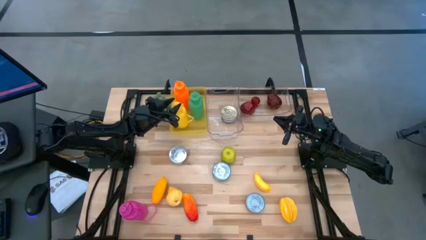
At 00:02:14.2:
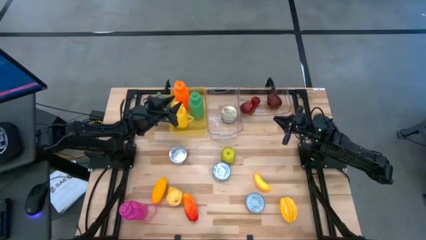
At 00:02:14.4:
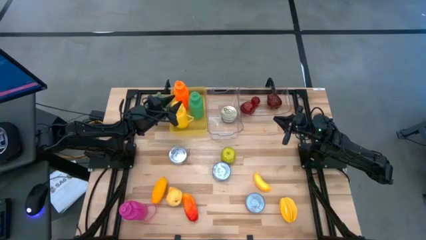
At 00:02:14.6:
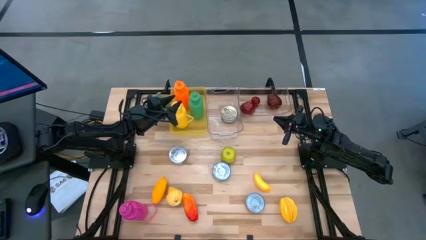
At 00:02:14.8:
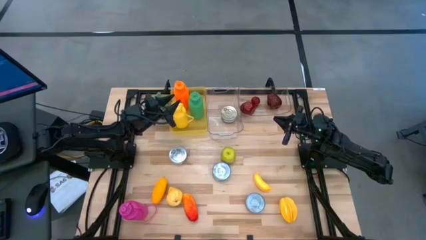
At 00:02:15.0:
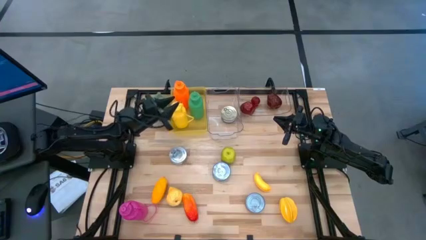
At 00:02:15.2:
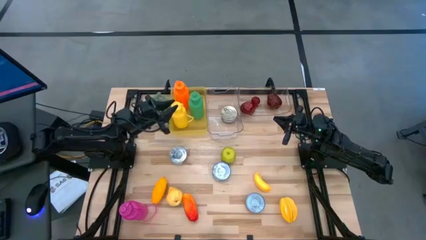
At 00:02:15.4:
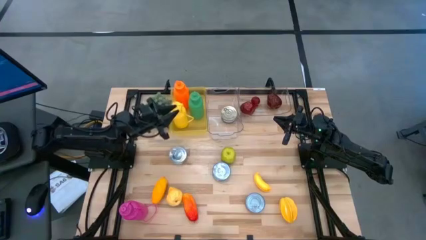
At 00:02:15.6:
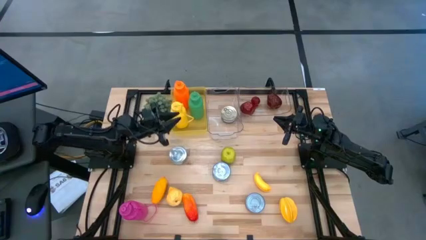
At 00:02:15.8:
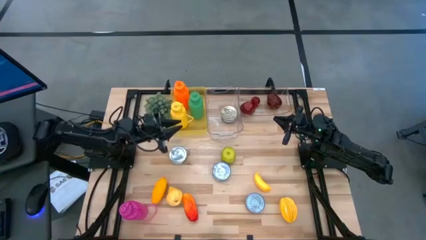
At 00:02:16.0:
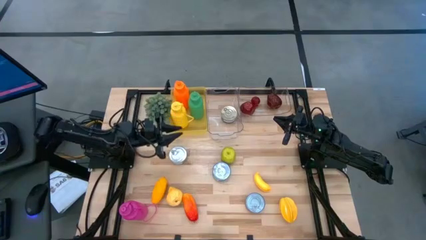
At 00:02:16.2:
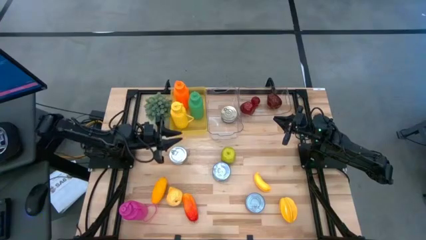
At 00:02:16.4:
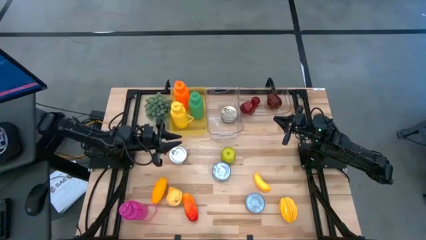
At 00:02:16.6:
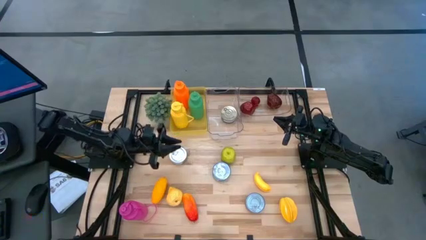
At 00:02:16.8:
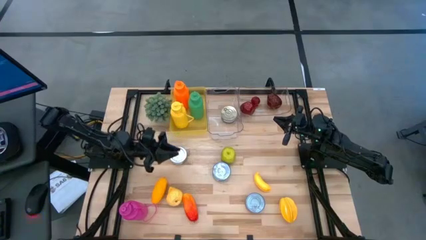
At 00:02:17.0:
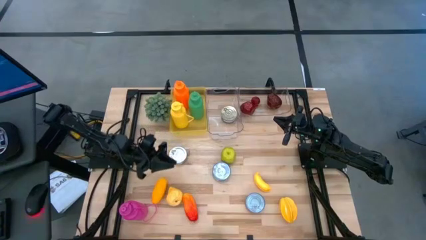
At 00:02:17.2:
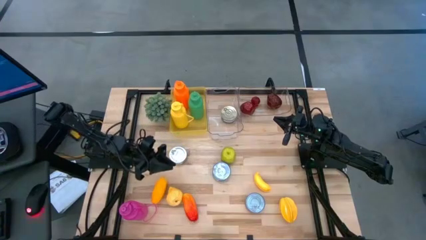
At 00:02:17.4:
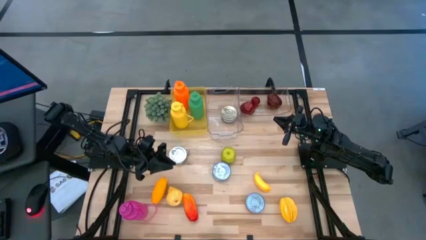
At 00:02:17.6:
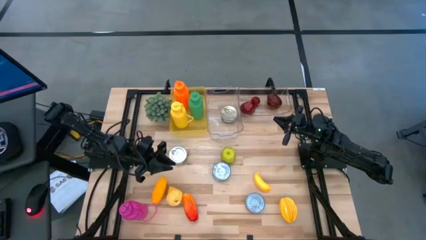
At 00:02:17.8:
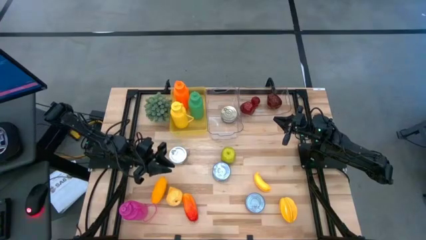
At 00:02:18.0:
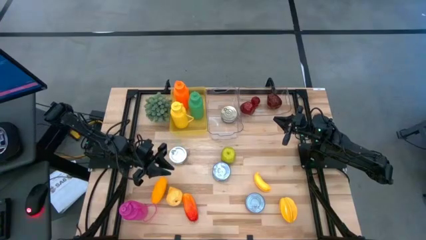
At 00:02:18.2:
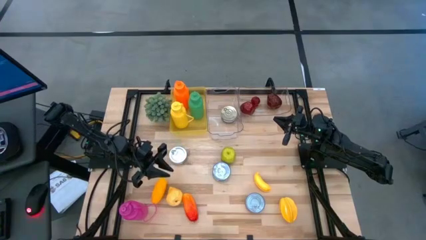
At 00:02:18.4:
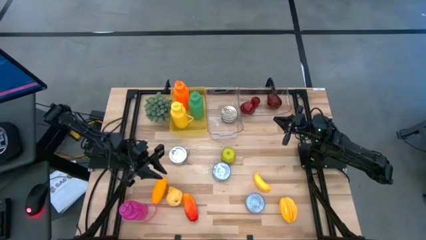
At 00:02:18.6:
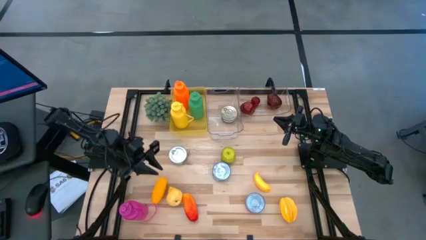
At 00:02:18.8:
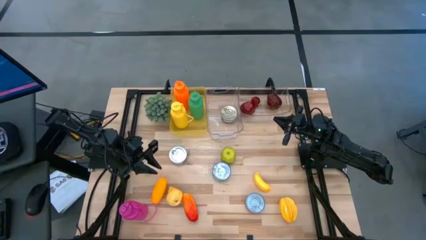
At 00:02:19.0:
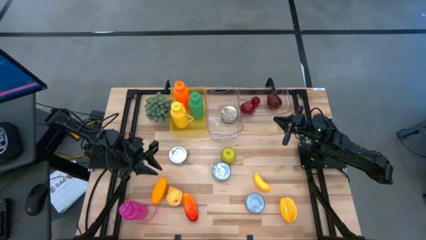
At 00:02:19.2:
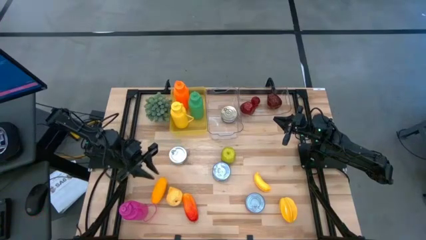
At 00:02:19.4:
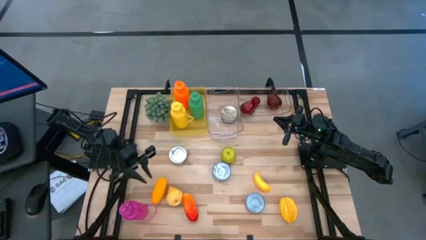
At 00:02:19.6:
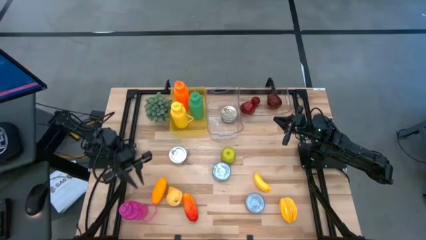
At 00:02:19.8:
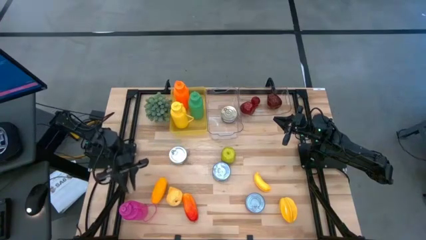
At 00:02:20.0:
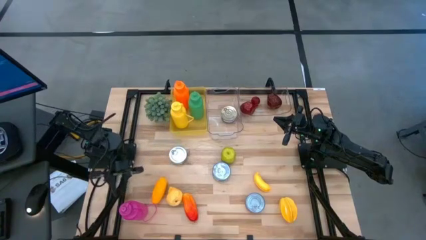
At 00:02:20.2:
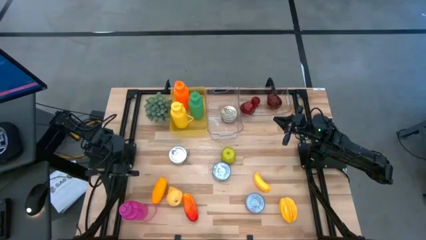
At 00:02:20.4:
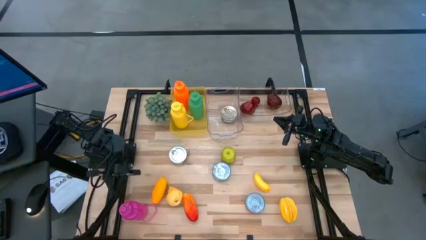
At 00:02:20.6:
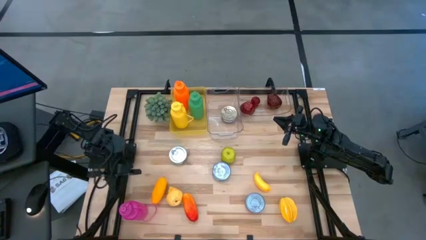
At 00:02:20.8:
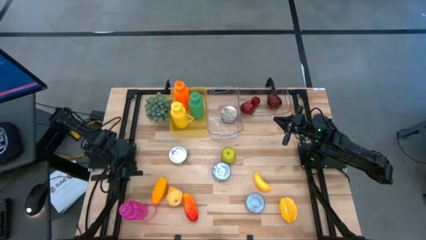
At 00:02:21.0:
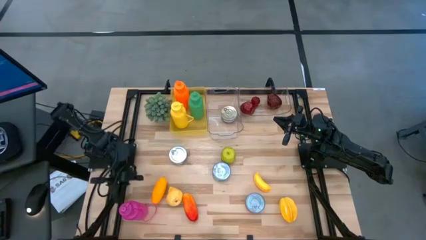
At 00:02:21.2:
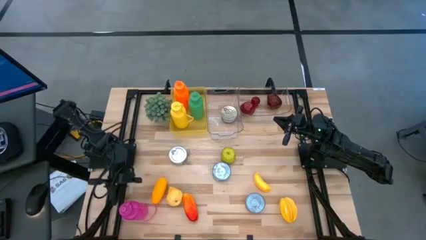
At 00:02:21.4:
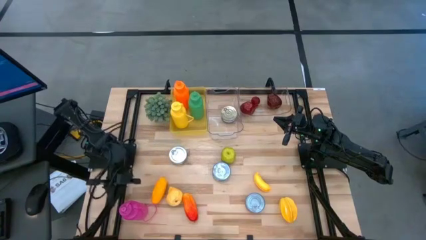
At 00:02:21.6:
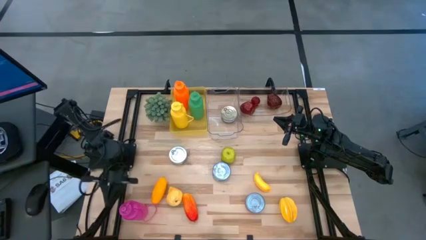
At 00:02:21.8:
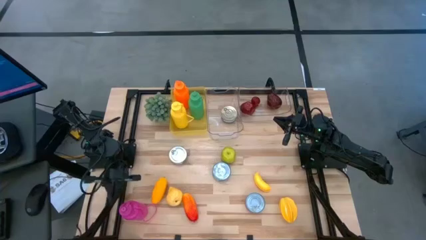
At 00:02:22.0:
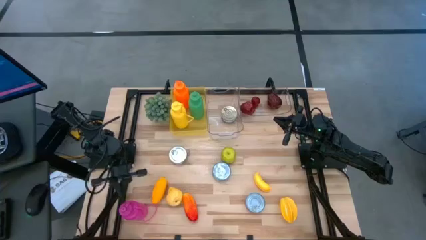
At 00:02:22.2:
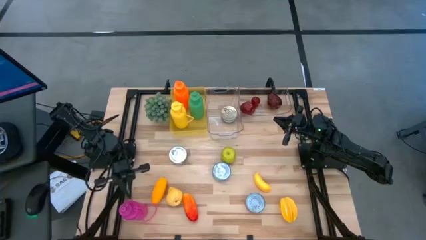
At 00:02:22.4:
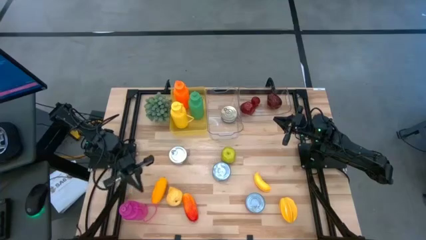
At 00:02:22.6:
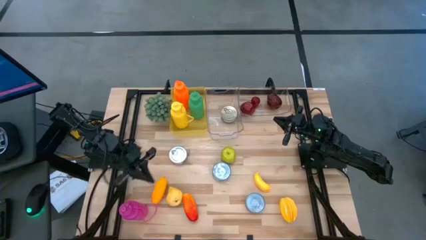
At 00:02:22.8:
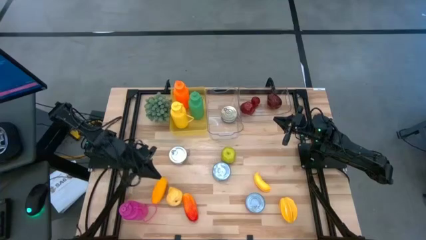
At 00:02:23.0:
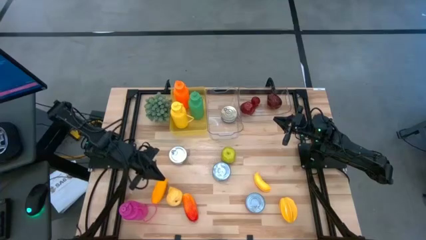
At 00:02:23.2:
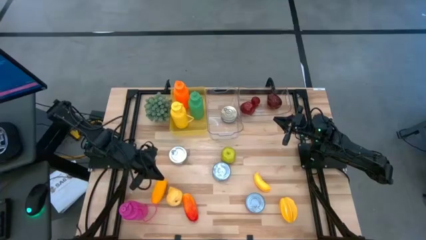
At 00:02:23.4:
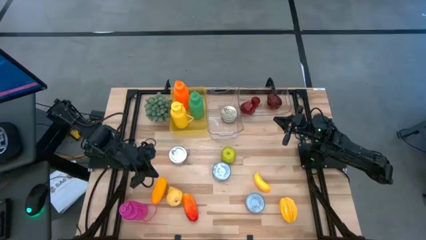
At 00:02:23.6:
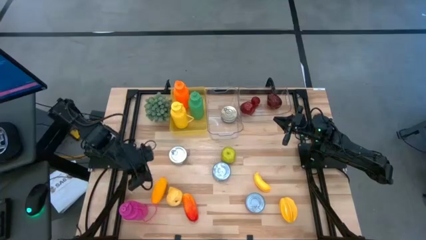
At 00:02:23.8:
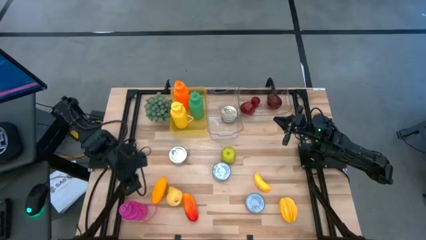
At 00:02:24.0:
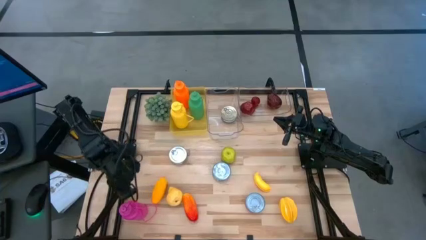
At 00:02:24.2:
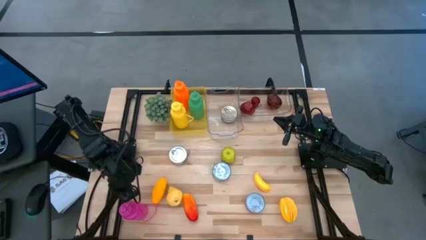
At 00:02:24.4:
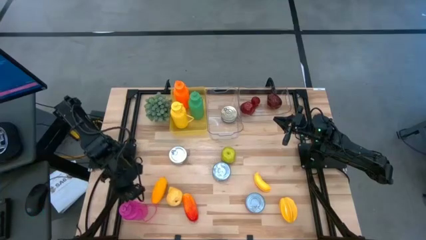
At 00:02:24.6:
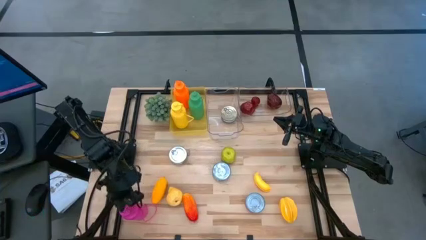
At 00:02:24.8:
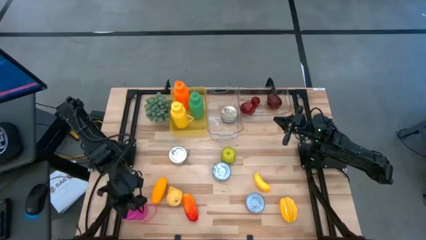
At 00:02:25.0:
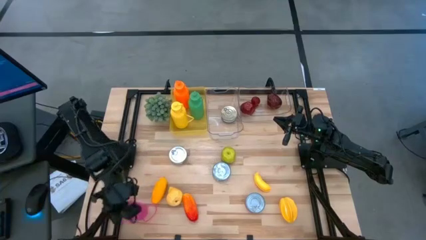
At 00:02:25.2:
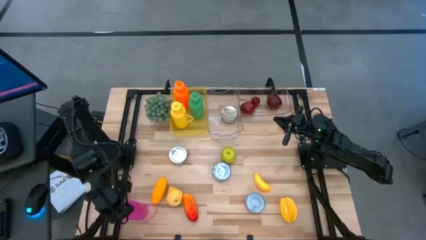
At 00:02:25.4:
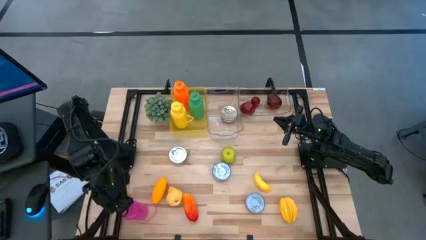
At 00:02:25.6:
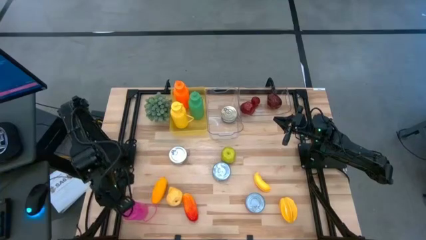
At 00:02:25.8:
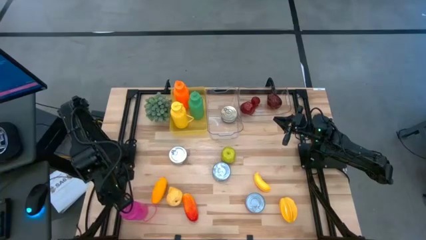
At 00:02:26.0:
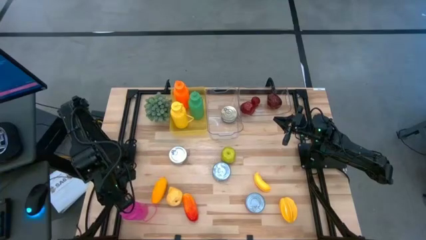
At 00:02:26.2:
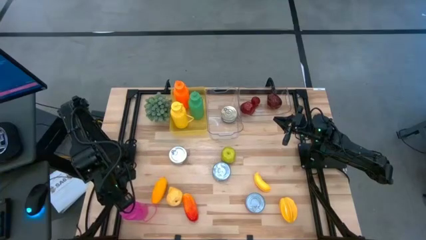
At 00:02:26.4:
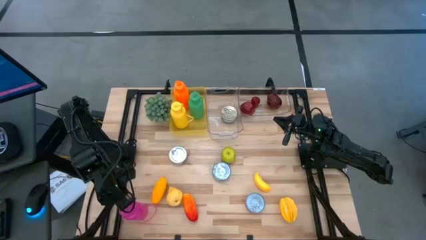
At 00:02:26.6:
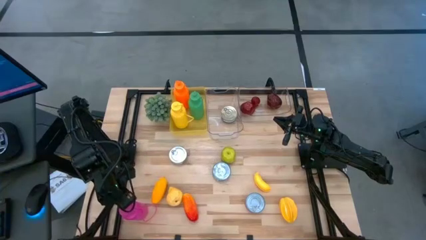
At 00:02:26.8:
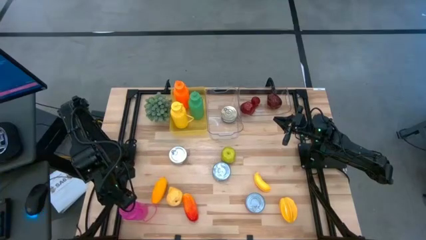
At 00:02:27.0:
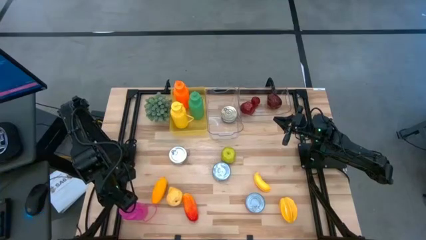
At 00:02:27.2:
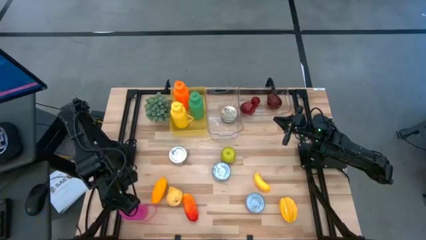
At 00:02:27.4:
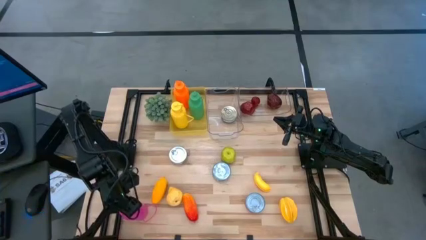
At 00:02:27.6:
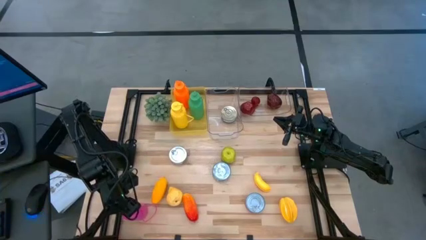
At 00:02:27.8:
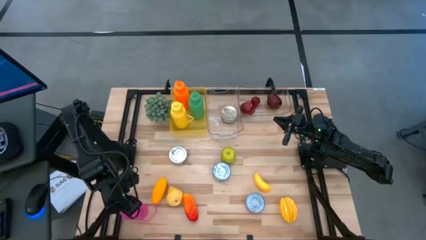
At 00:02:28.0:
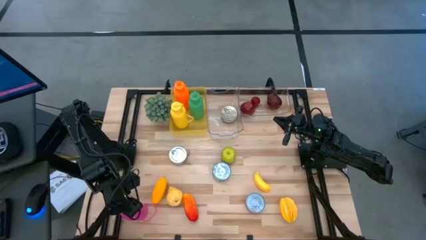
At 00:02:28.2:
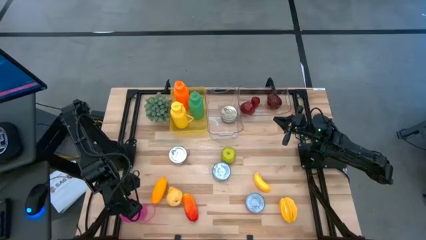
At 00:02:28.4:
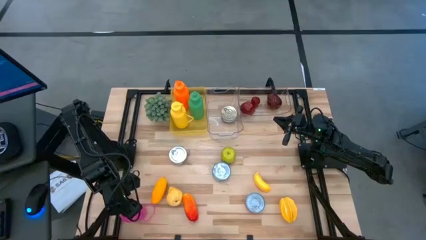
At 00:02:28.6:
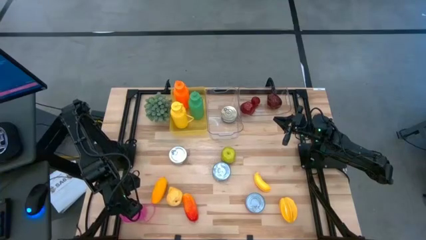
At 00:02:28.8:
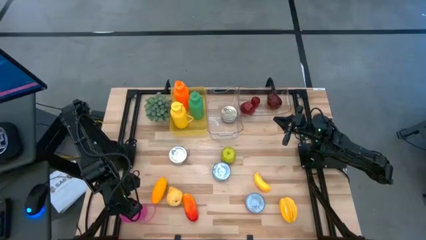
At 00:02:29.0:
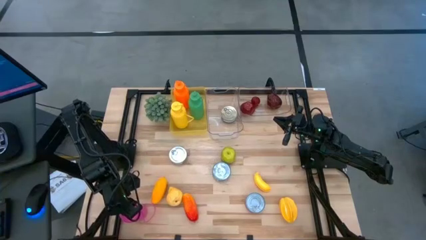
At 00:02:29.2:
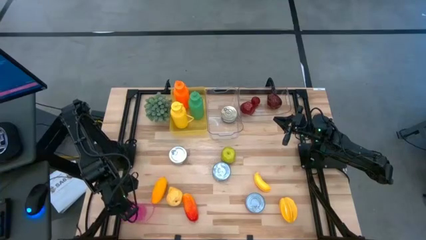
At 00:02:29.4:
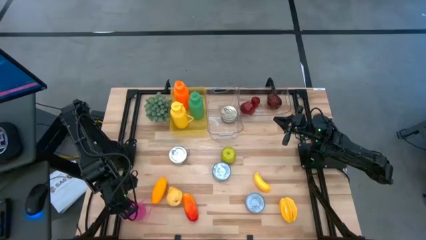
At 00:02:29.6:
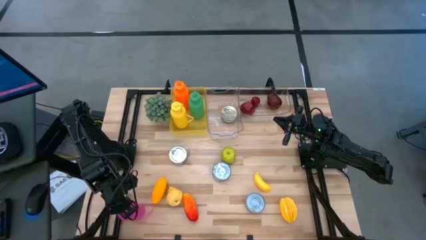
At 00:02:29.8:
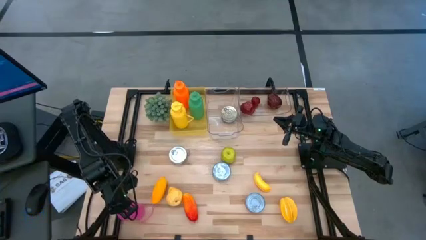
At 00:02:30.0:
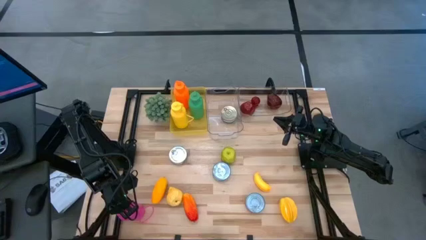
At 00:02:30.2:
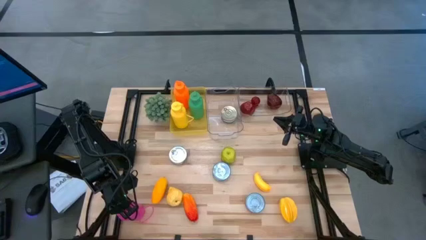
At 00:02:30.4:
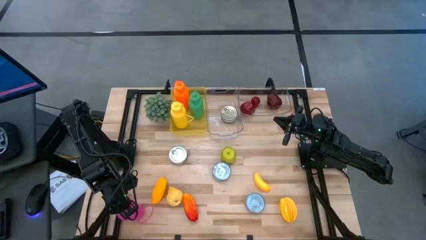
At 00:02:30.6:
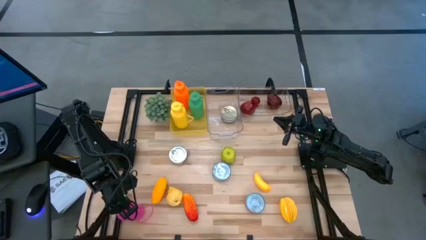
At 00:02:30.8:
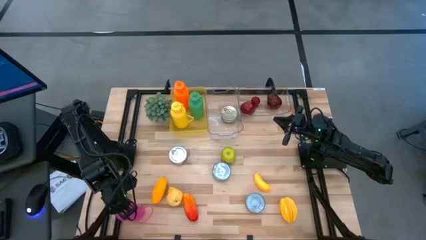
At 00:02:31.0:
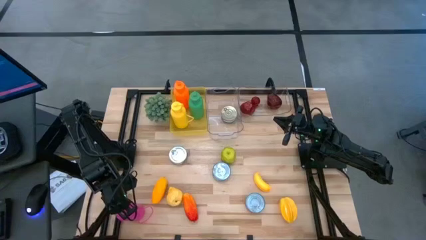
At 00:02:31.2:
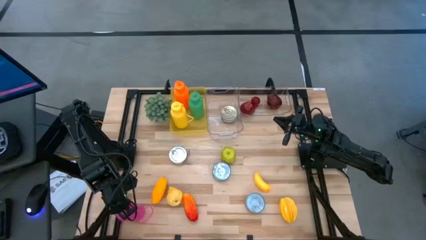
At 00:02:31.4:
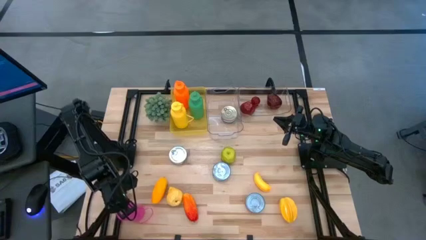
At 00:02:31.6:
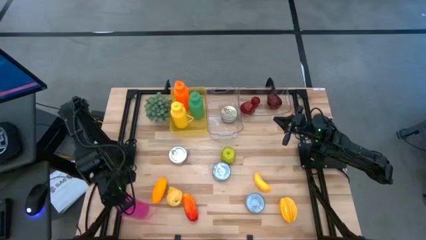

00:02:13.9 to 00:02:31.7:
Task: Pick & Place Food Item
Put the pink bottle into the yellow bin
